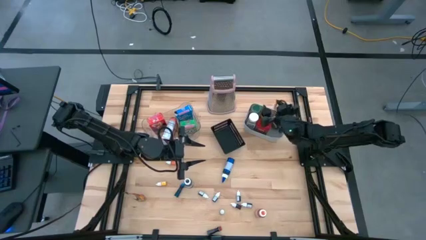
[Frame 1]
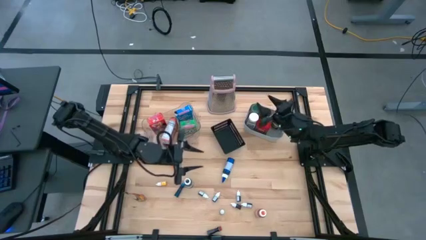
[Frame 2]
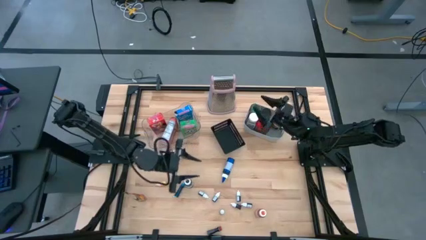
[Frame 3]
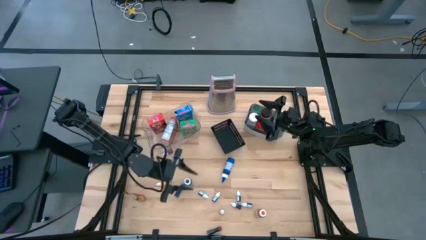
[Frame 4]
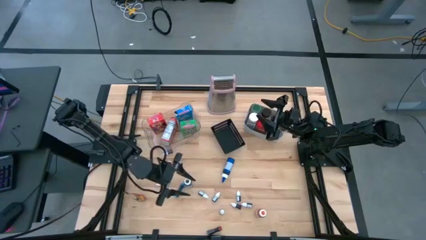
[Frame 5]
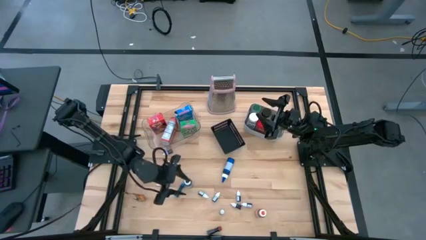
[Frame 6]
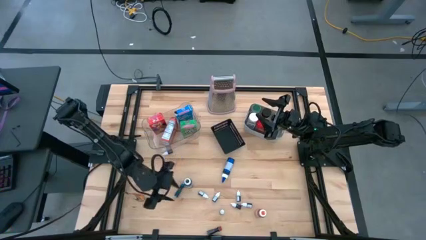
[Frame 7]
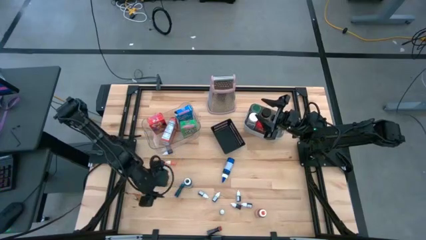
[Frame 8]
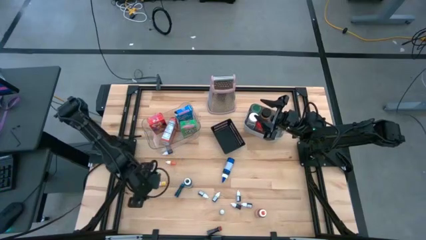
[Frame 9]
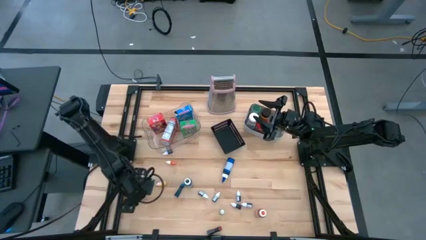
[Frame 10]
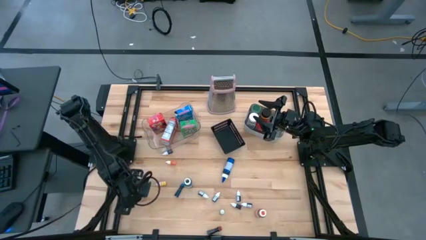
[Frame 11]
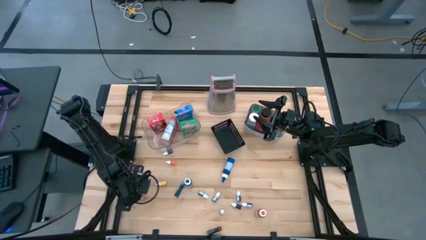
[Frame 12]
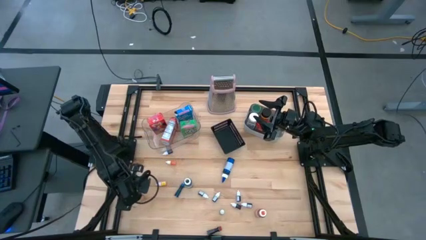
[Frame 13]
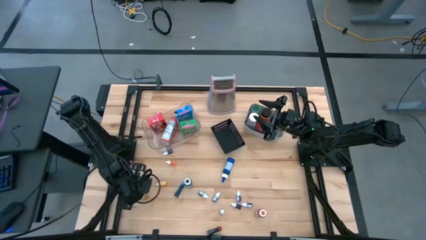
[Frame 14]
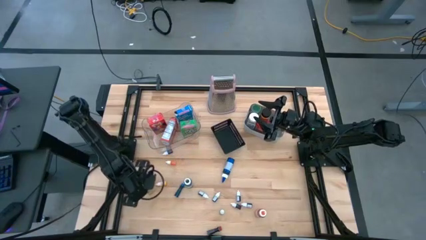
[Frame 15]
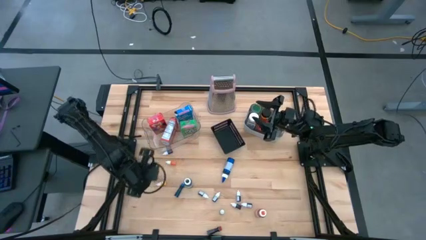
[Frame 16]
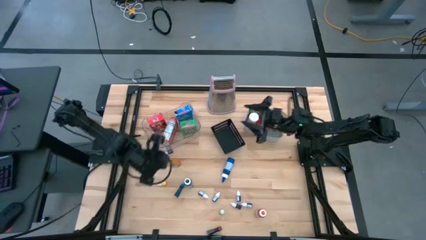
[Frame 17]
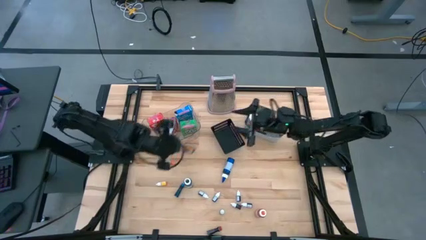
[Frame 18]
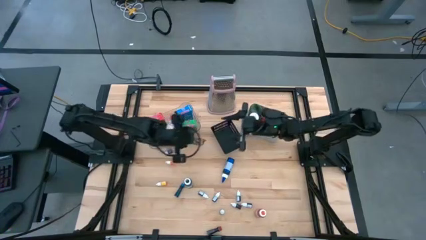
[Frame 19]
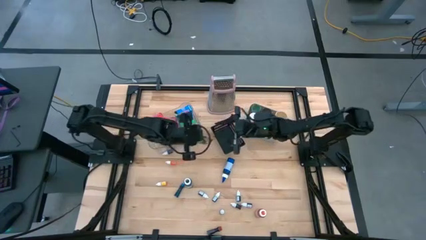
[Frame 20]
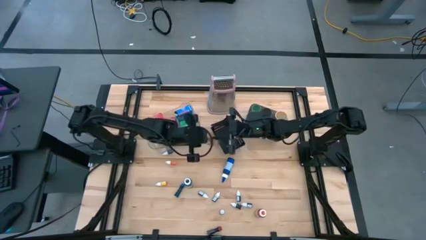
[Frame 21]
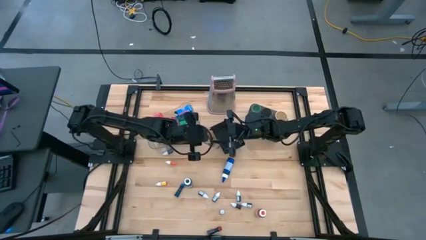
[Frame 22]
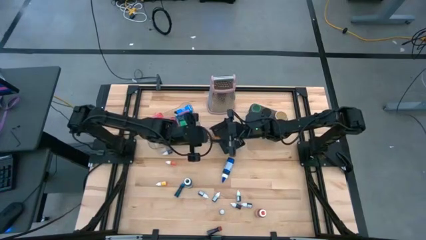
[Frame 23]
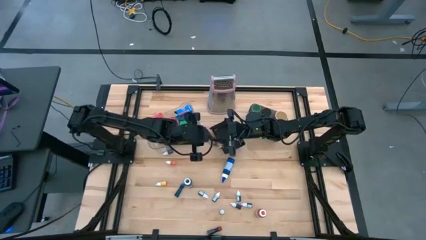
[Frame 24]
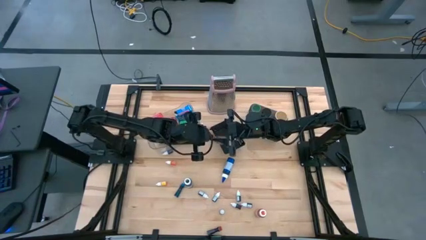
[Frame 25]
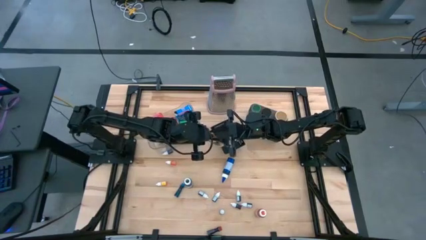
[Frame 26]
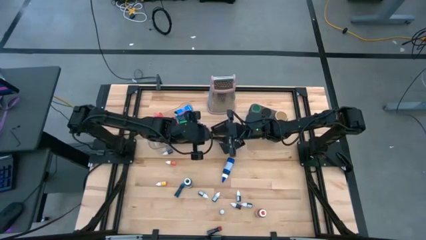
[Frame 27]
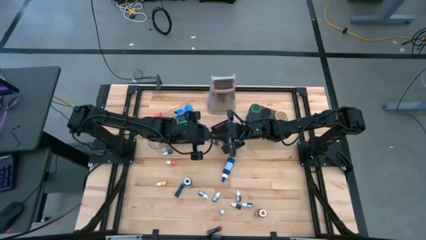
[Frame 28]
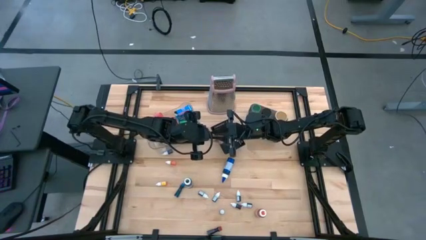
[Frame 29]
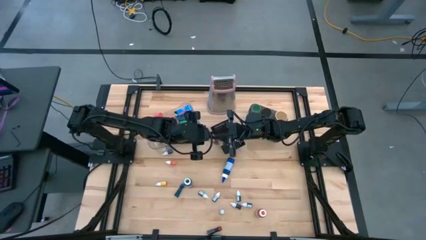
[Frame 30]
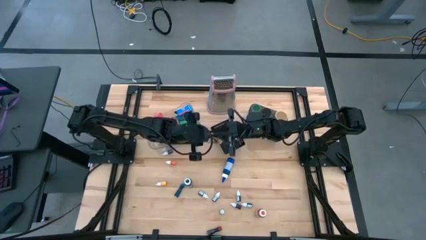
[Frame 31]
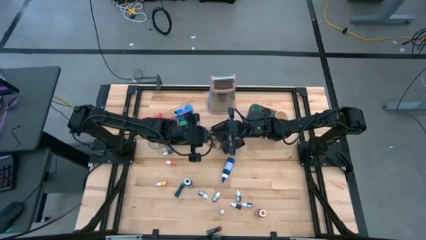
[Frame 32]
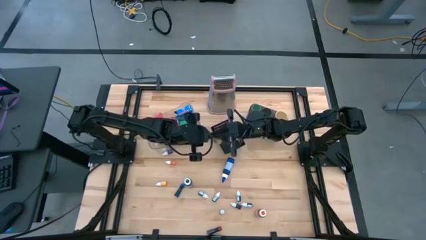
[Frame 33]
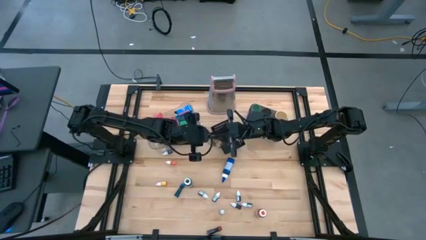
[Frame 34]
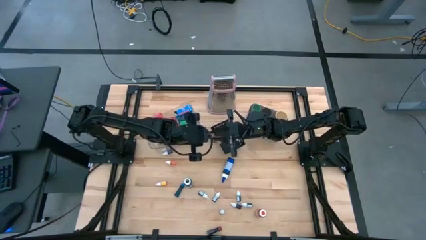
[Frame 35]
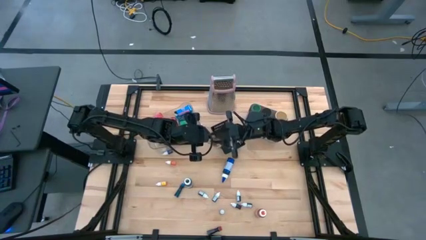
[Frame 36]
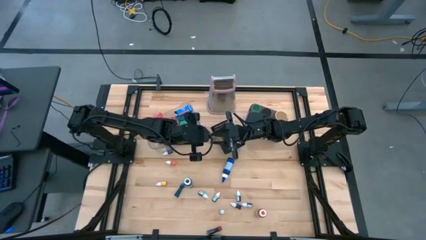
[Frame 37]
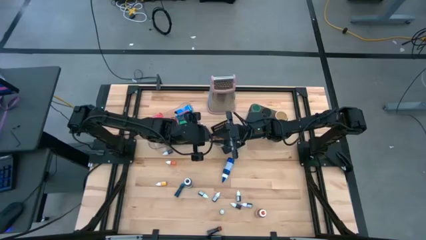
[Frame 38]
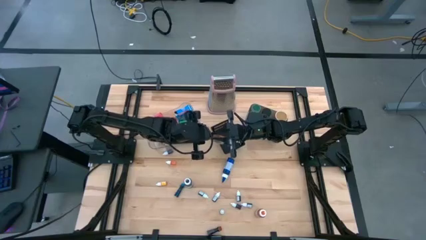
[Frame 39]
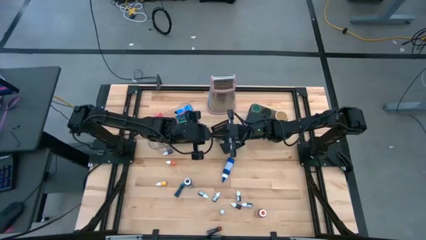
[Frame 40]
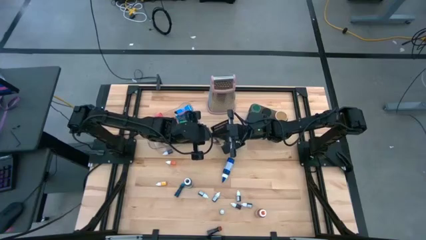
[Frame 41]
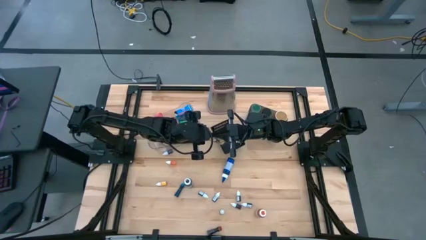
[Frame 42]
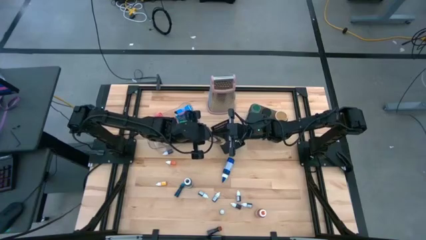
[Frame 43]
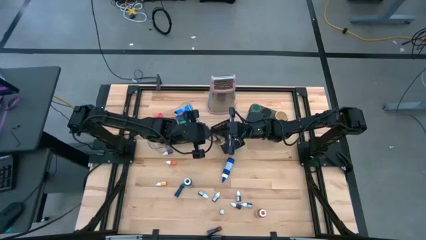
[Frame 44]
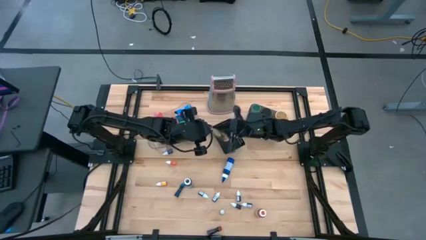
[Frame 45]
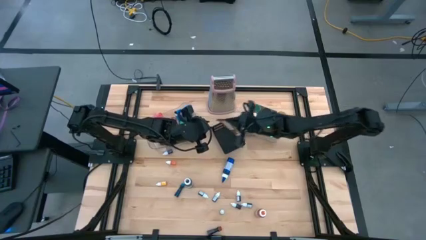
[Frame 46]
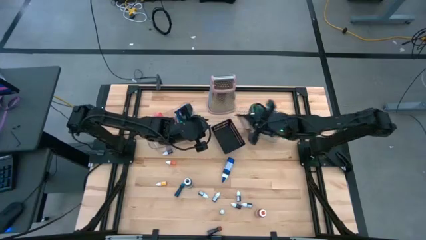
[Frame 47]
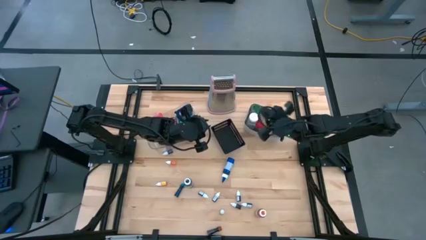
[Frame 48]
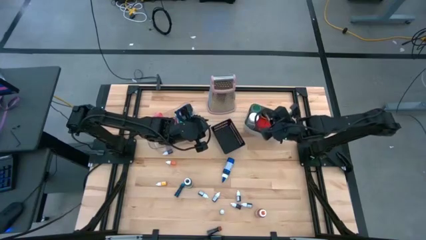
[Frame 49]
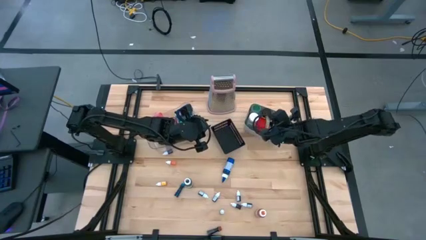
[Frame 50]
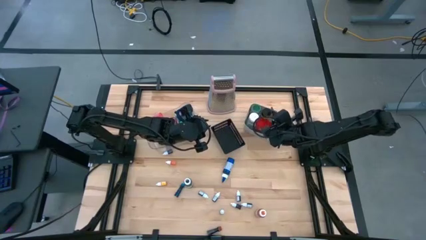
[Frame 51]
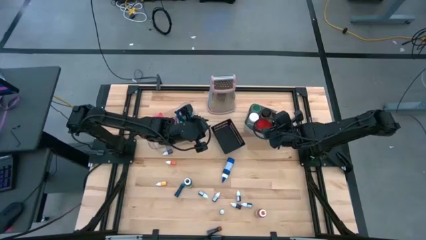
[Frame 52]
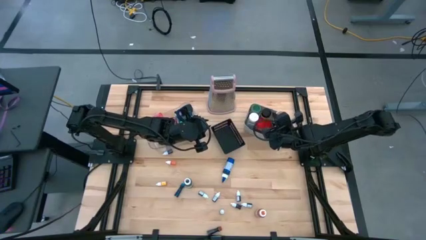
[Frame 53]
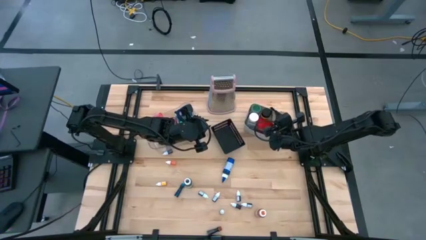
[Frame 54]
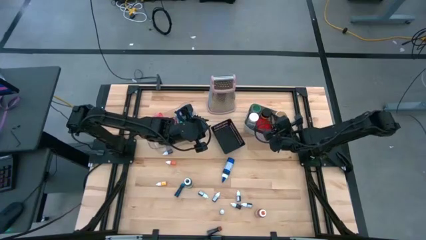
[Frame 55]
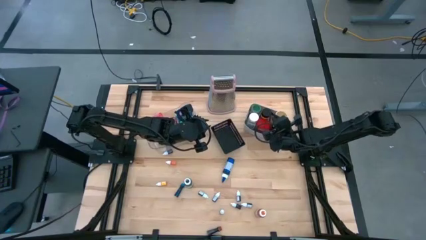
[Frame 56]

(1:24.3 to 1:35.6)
Task: Pick & Place Kitchen Items
Put the orange seasoning pack into the gray bin

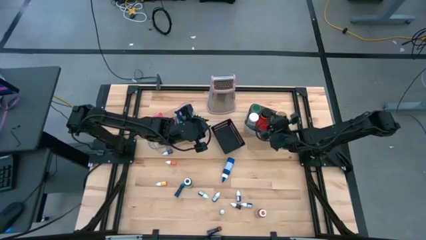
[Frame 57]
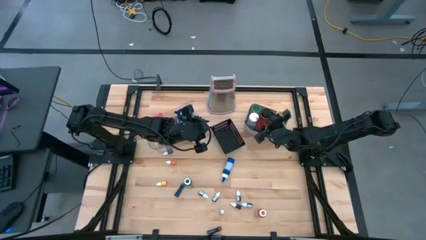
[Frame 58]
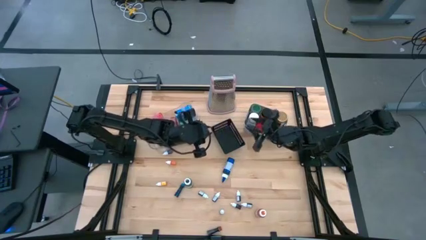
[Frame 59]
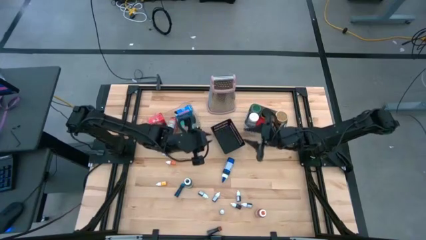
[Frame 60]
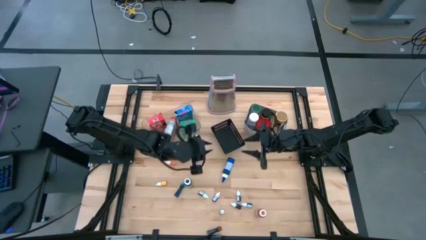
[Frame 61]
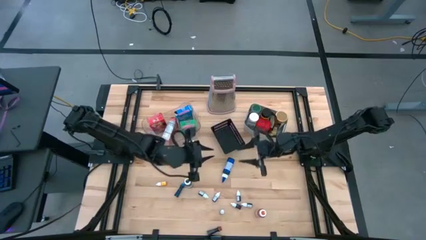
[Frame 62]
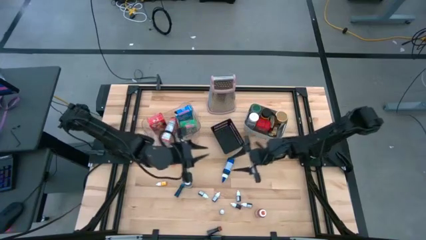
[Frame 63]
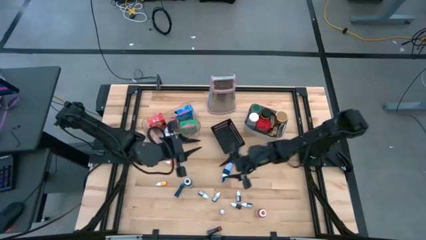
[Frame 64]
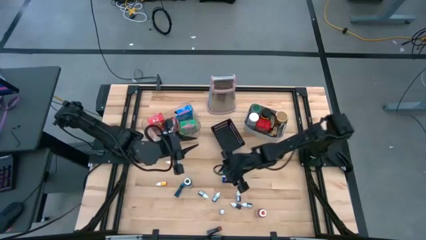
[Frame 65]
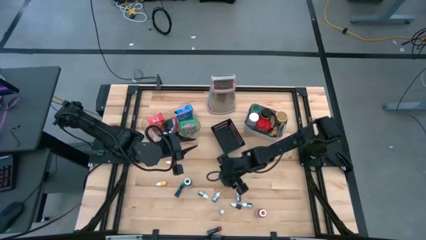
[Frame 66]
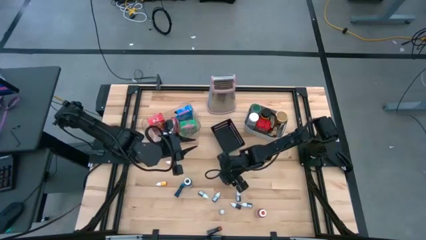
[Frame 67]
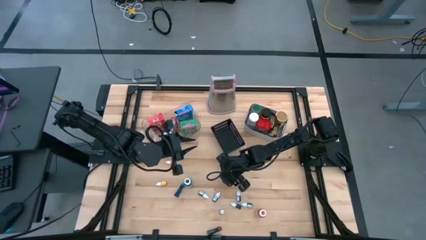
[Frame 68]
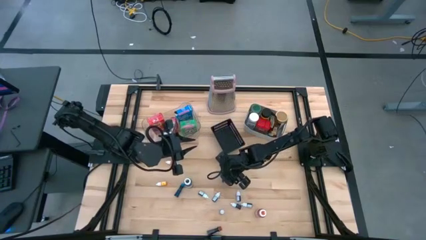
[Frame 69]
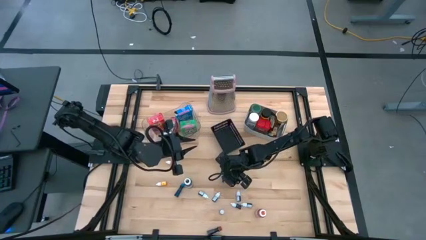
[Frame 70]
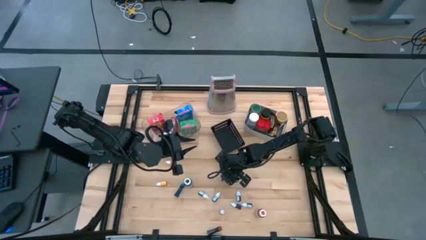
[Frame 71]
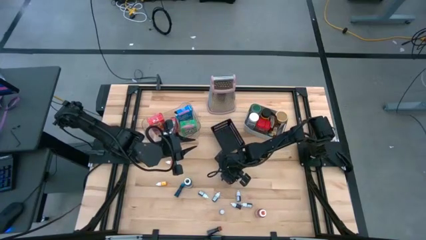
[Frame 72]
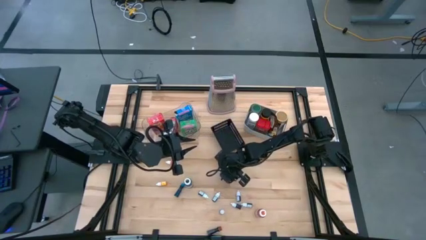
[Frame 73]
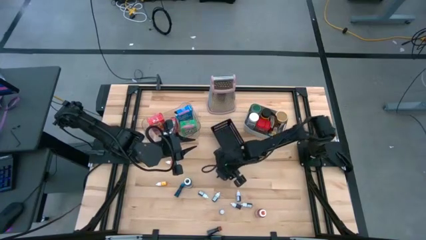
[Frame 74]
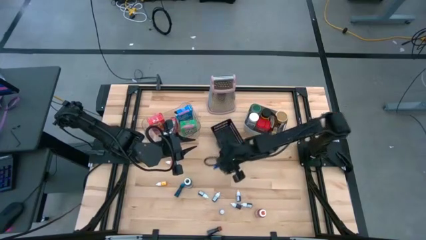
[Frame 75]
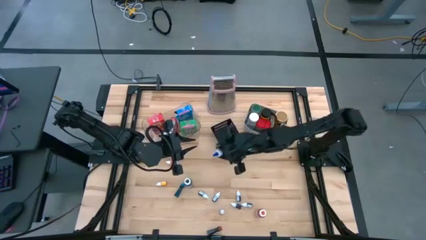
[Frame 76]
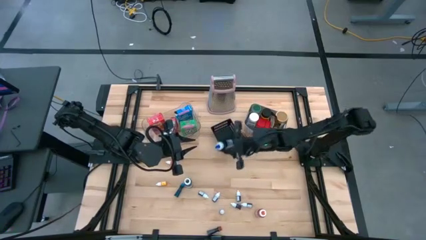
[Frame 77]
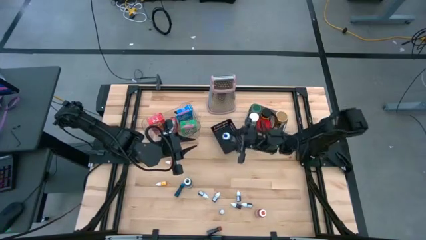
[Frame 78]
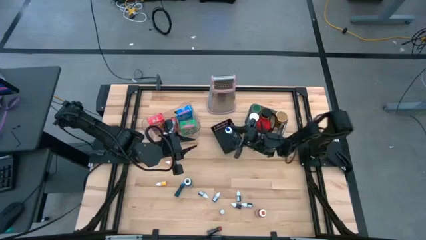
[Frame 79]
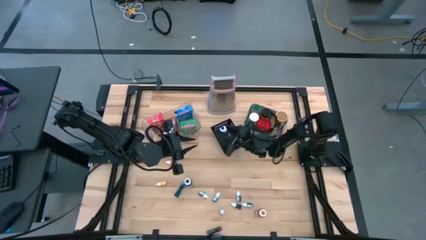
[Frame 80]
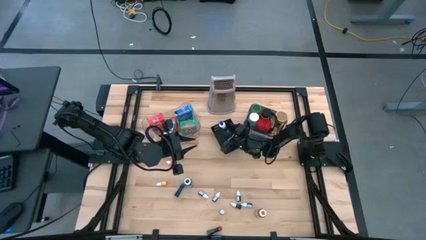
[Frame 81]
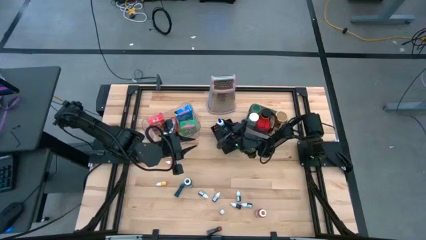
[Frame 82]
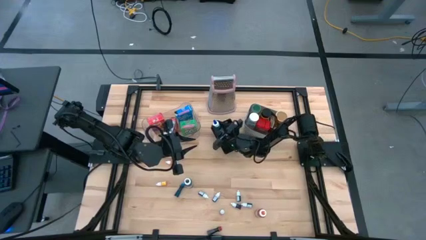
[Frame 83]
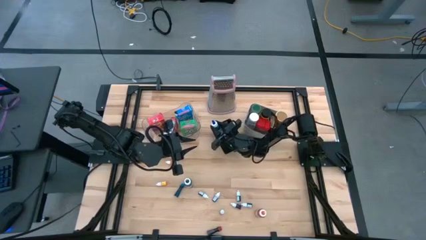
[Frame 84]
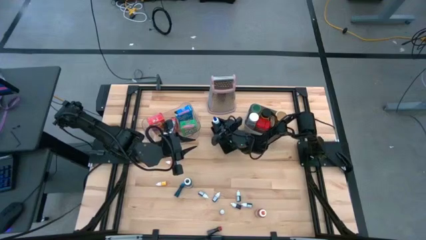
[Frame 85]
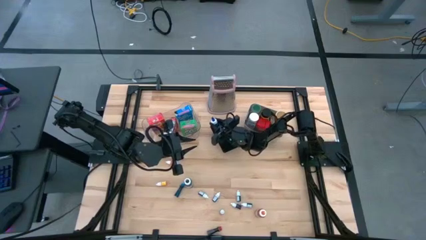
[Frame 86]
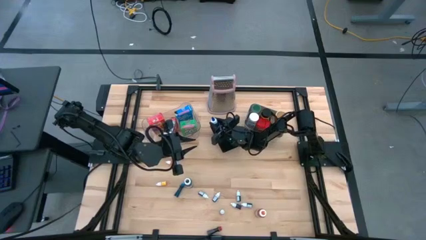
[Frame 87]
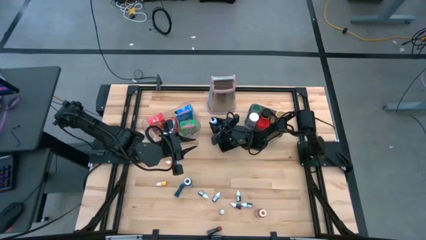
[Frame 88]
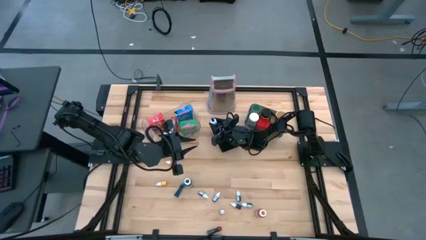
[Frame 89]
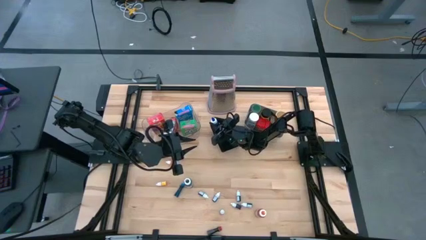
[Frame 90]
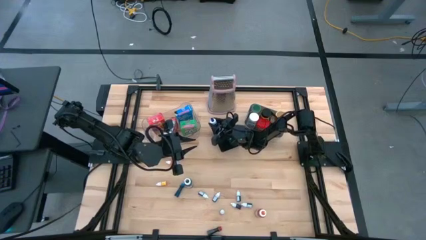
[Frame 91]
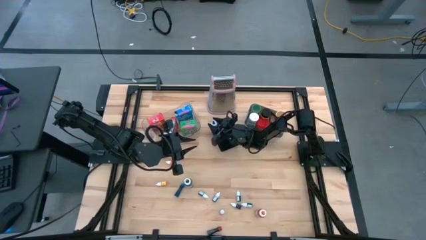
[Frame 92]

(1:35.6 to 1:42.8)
Put the large blue food coloring bottle into the black bin
